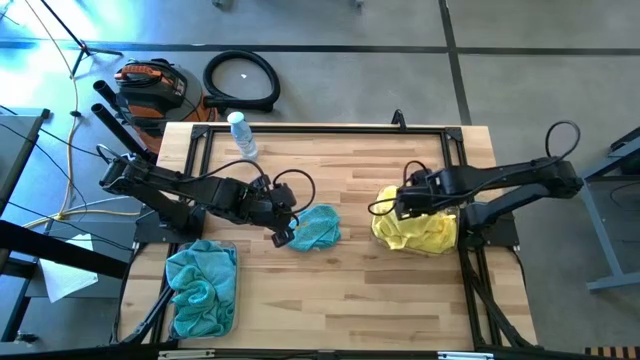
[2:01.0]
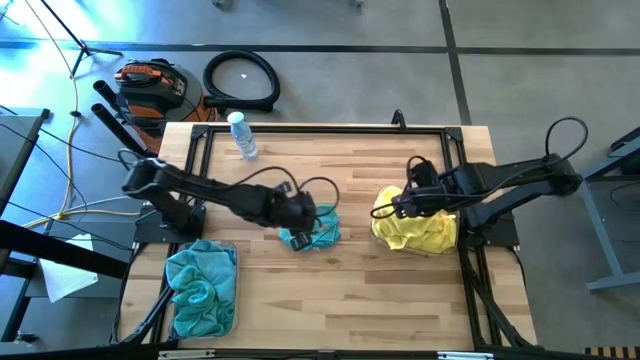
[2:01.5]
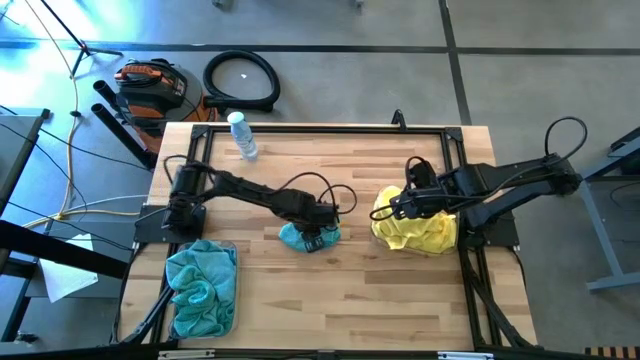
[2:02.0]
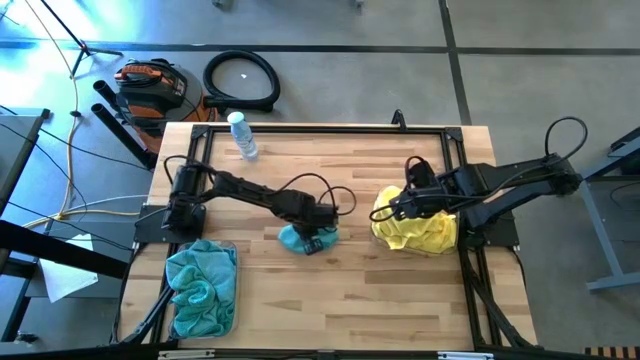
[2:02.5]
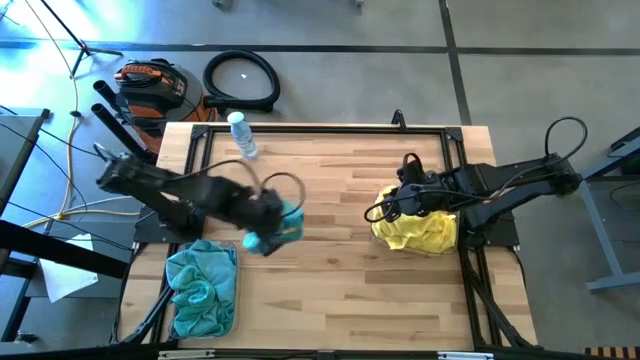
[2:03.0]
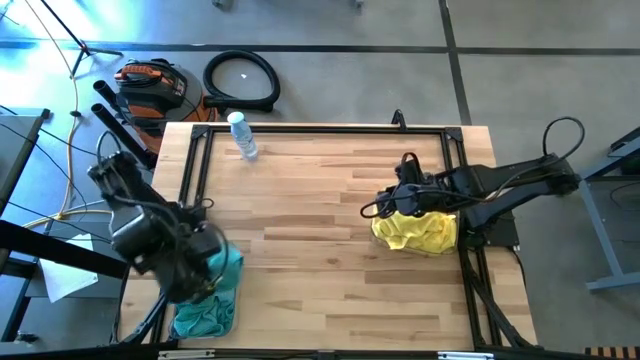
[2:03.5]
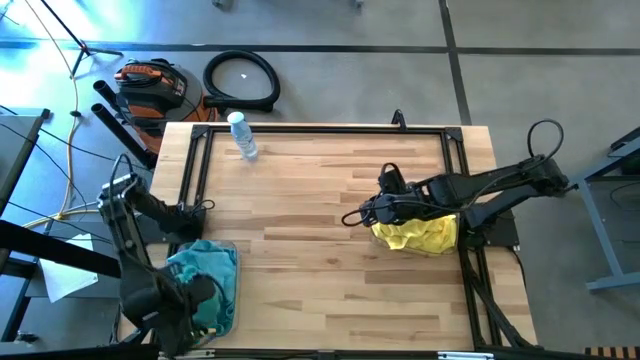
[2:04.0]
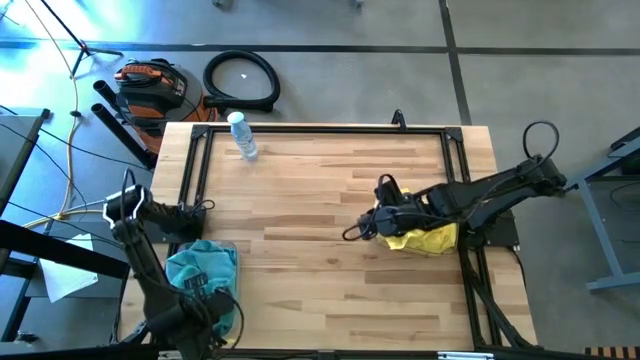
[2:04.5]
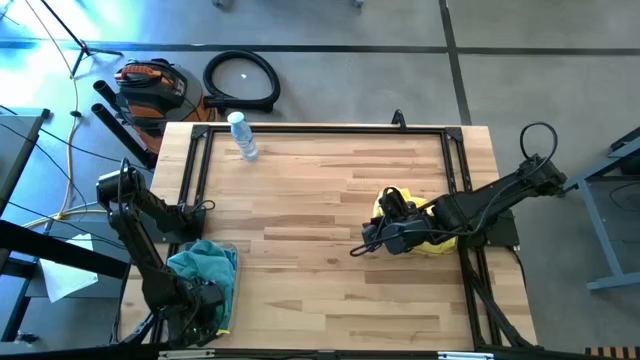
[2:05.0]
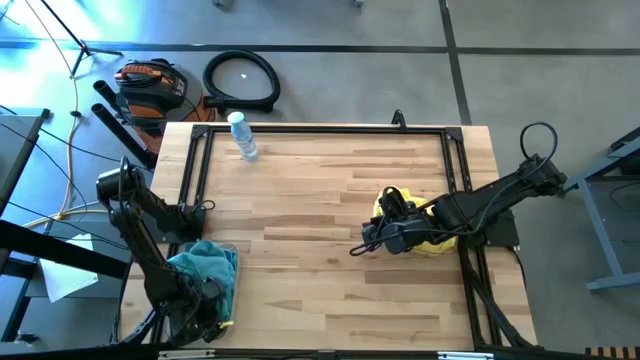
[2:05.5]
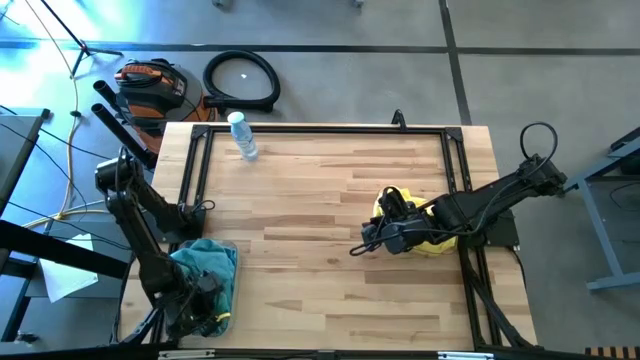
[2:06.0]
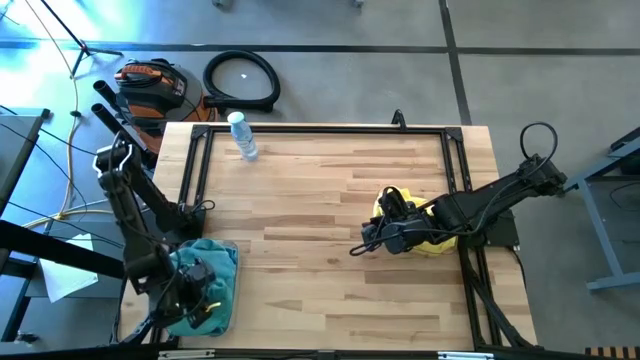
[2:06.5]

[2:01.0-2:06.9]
Task: Sort microfiber towel by color & place in baskets
Put the blue microfiber towel into the left transparent bin

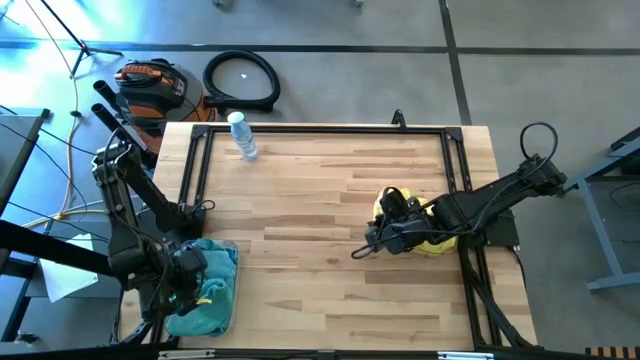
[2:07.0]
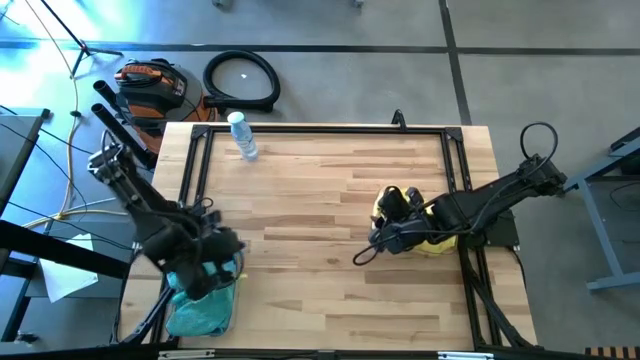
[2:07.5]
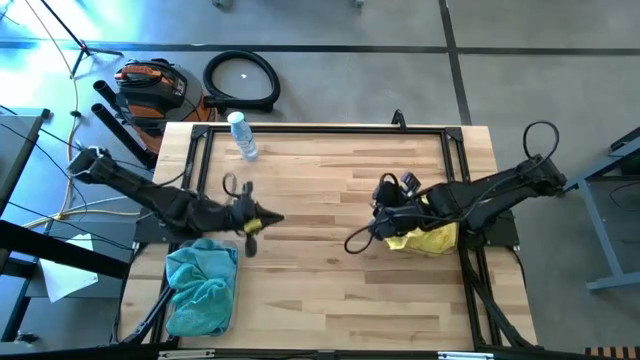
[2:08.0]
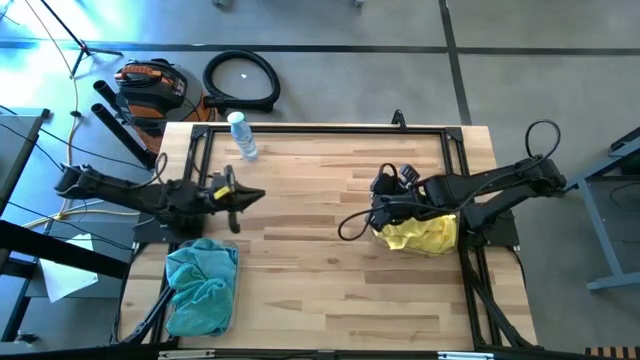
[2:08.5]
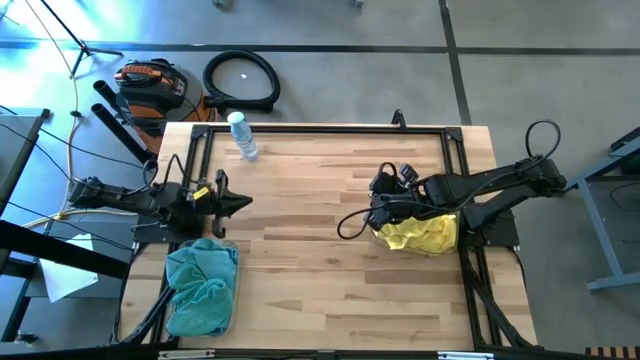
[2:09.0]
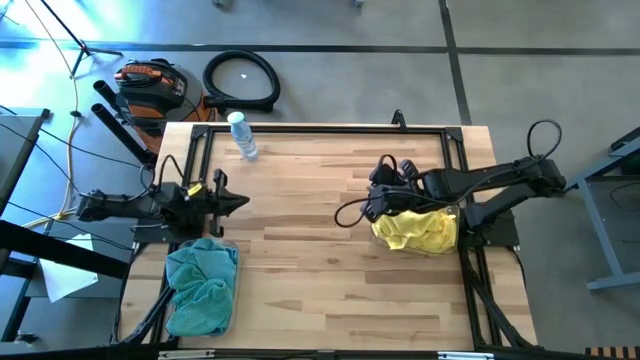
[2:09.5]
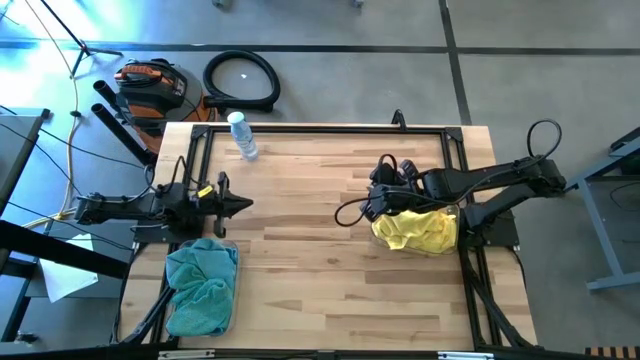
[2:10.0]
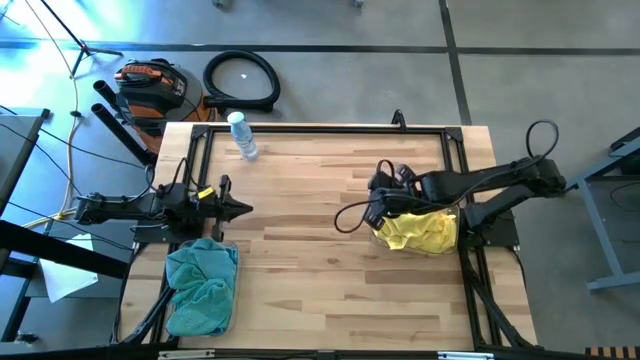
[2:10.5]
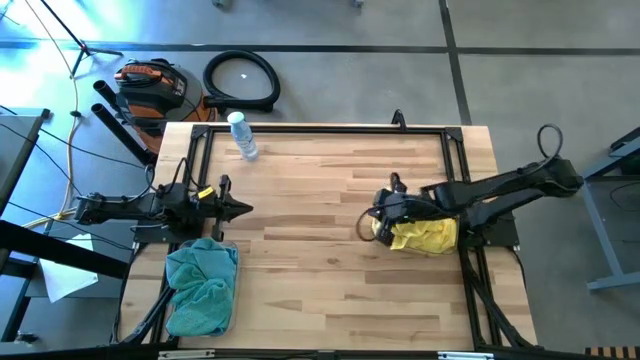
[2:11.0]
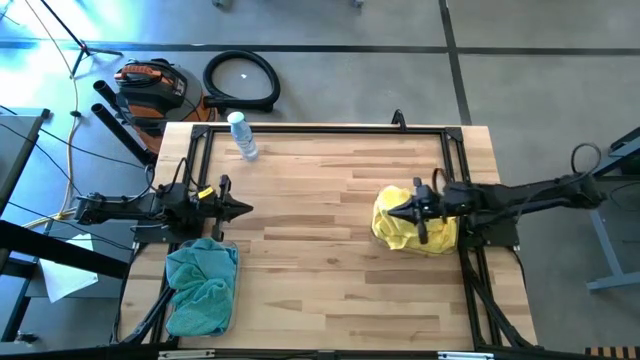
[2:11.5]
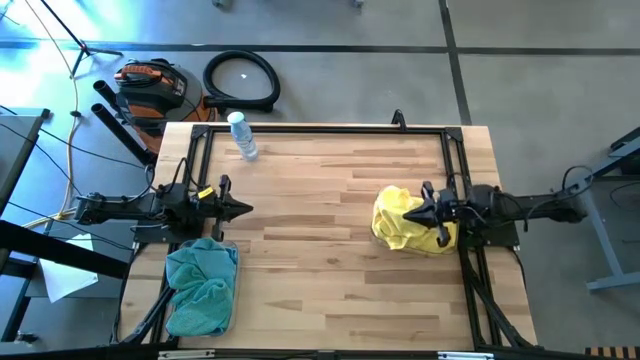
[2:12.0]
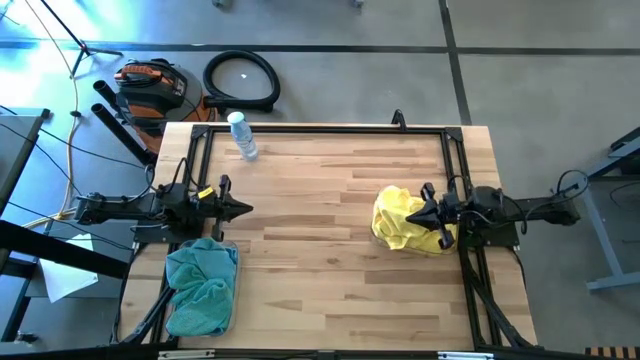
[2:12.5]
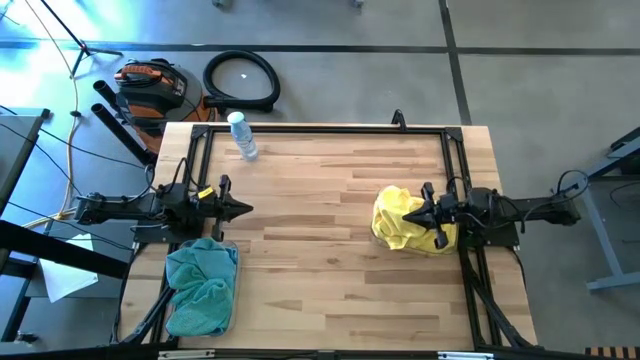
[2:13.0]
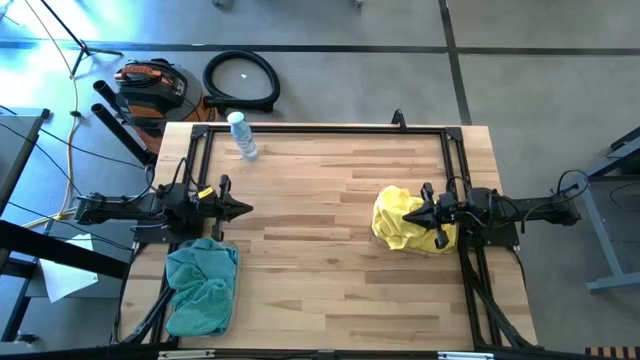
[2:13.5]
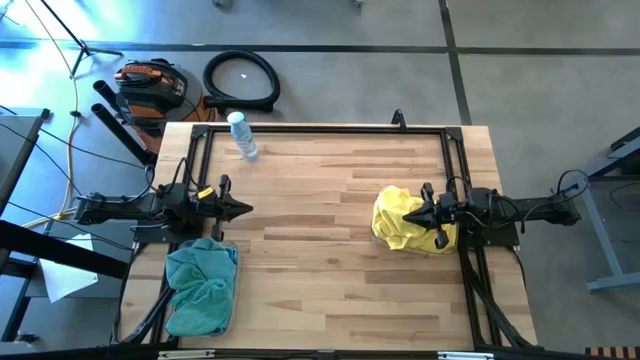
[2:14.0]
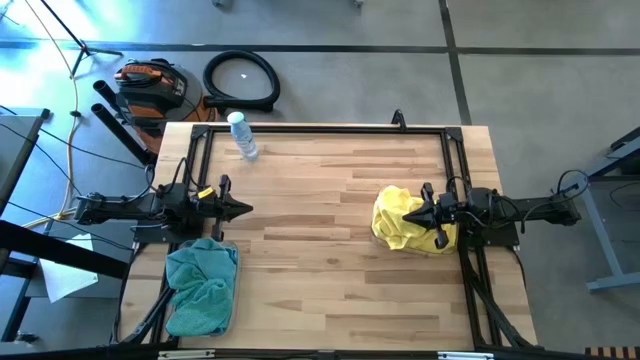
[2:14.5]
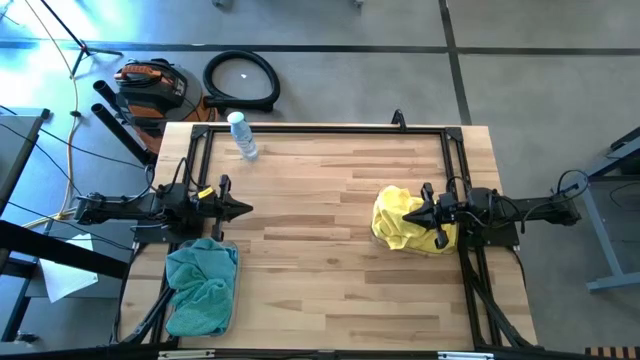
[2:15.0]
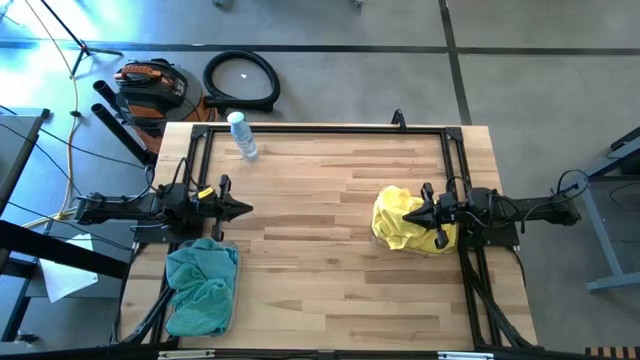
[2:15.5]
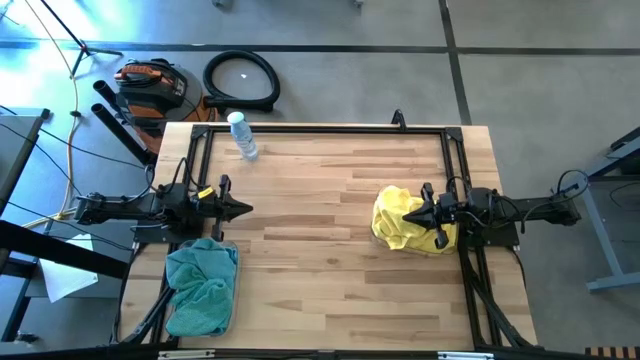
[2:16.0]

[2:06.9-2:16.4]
Return to Home Position

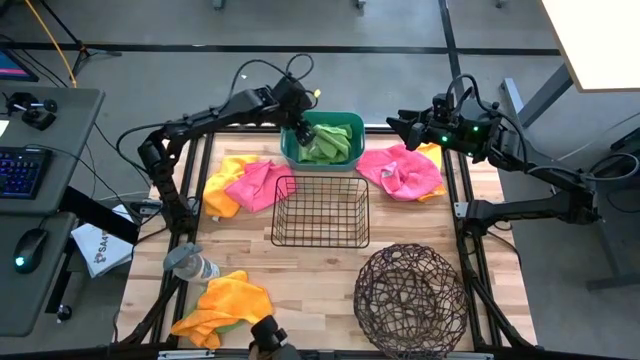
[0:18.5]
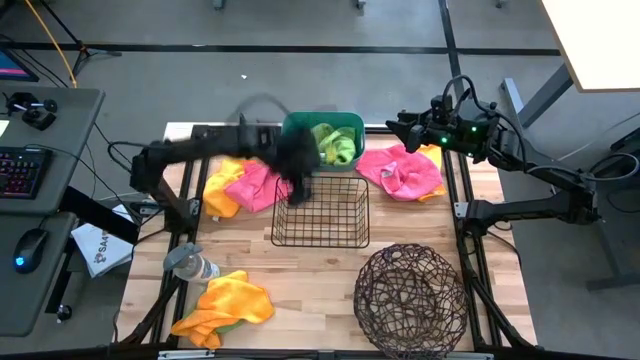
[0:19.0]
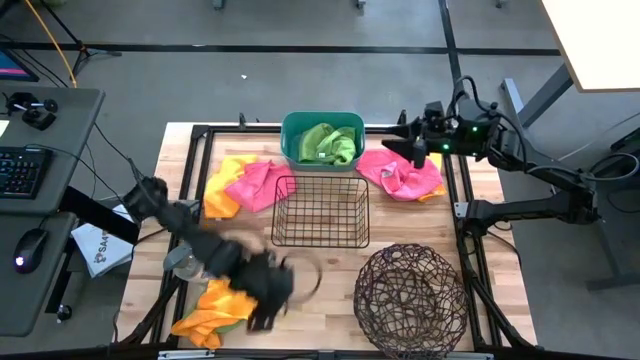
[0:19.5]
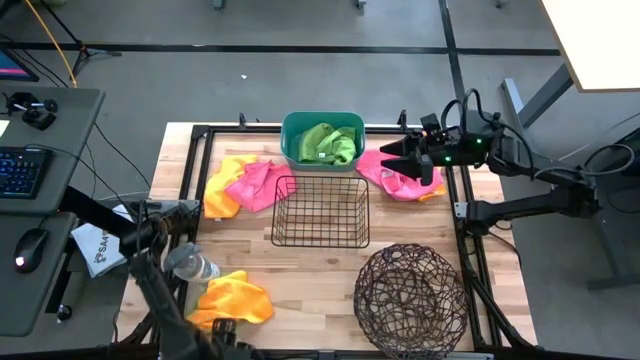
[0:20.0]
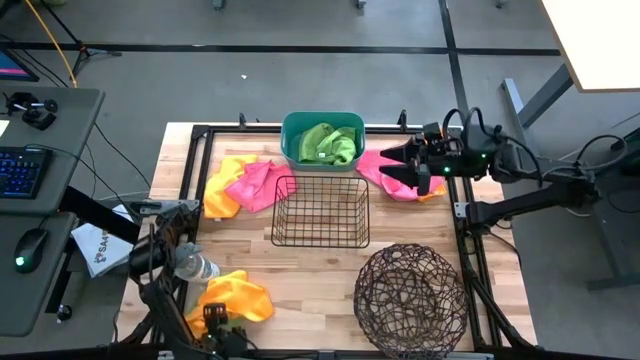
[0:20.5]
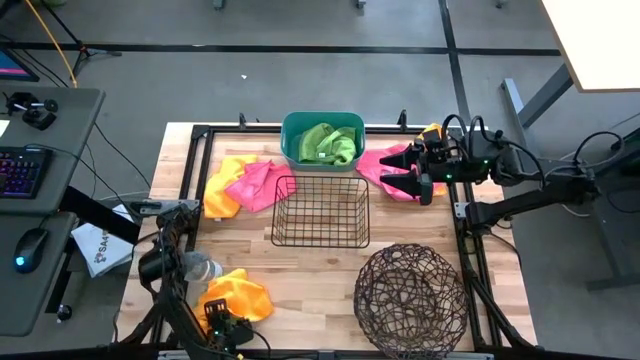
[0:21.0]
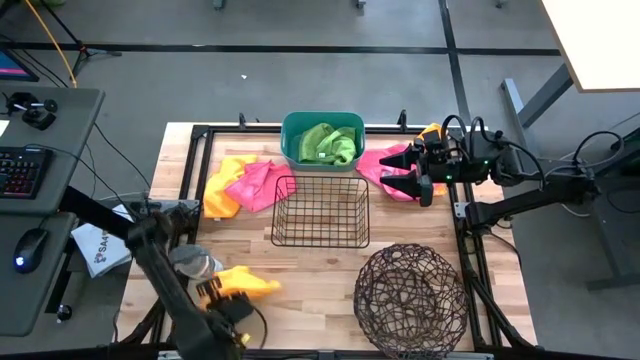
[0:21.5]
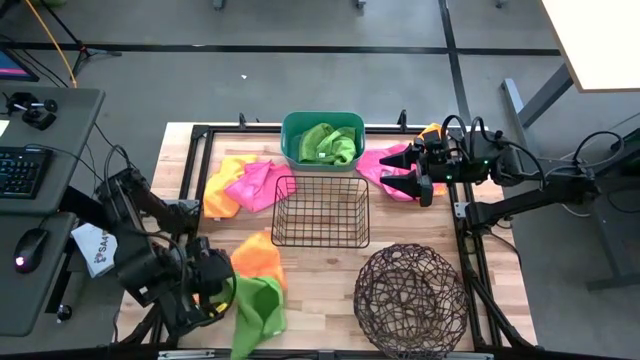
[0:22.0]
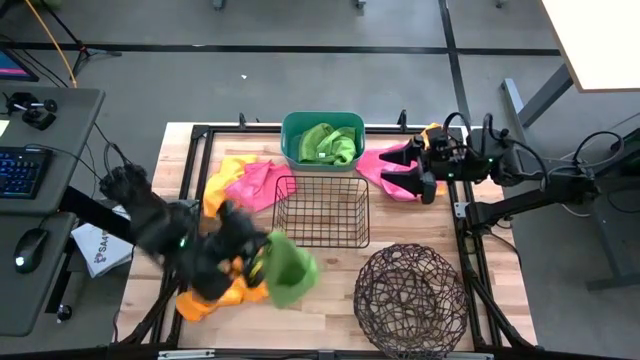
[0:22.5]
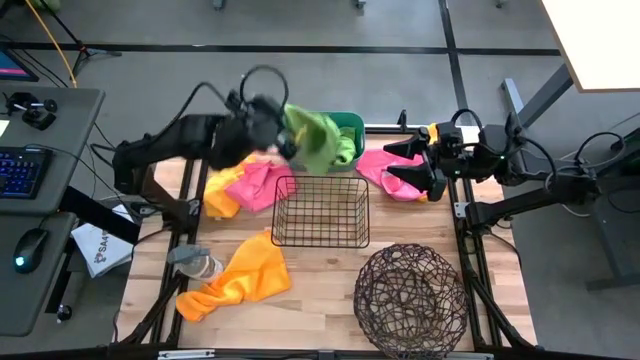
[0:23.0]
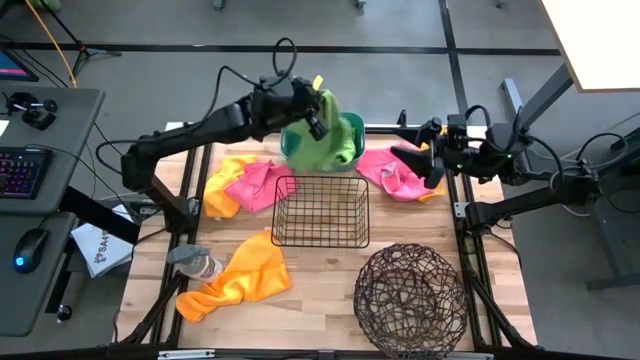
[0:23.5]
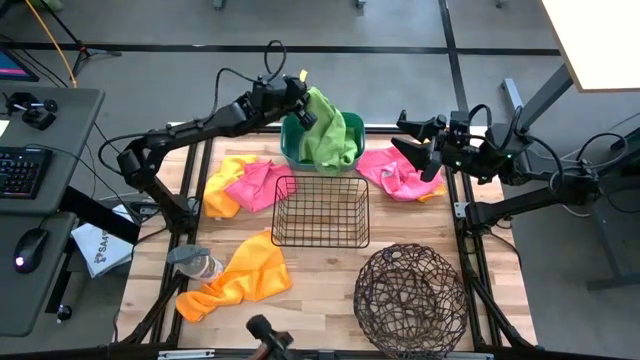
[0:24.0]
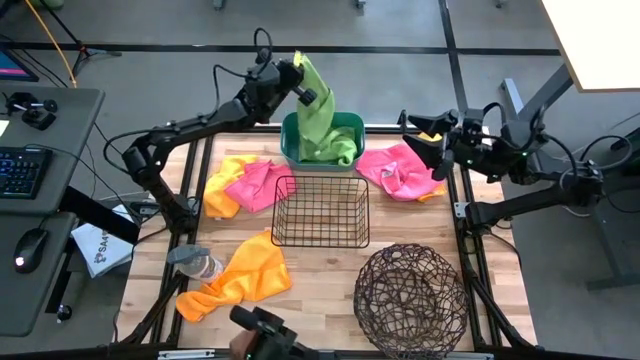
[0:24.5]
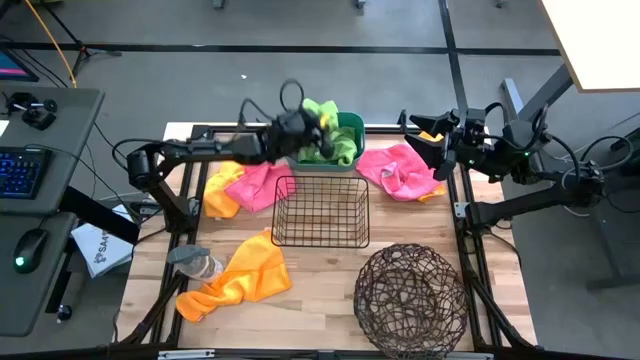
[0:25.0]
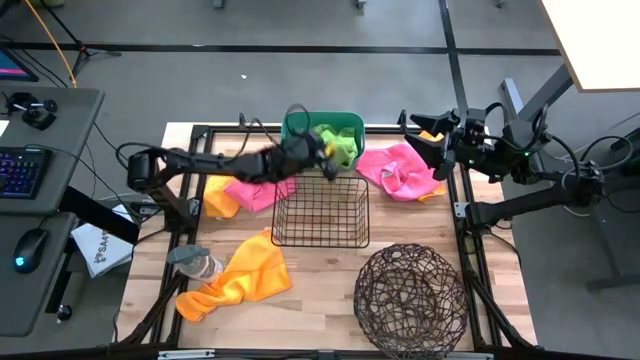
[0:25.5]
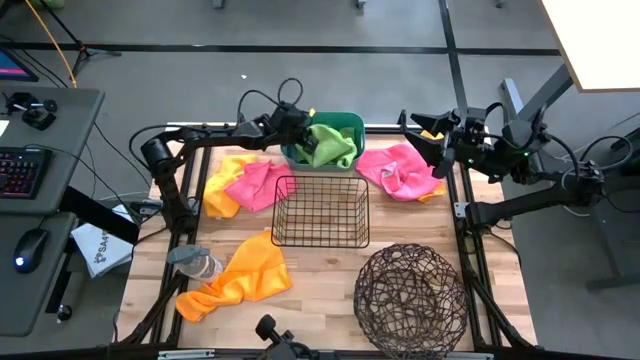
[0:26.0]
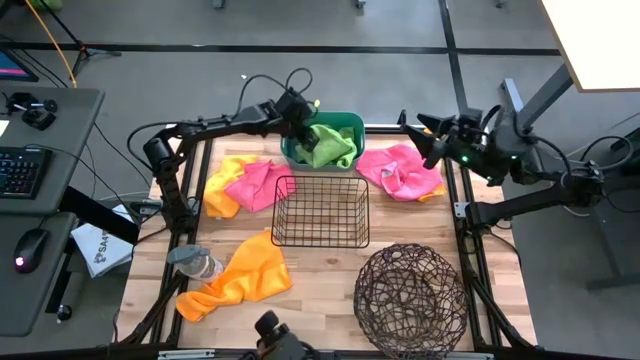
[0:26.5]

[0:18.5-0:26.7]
Task: Sort microfiber towel by color & place in baskets
Put the green microfiber cloth into the blue bin
